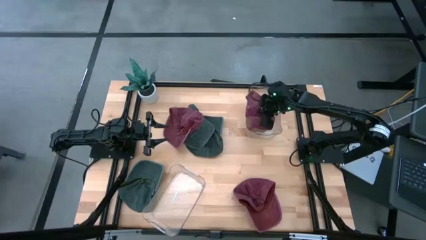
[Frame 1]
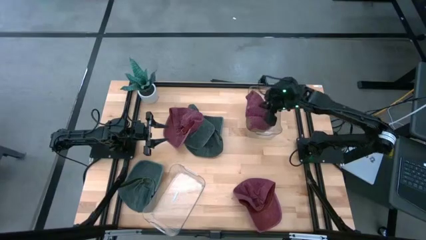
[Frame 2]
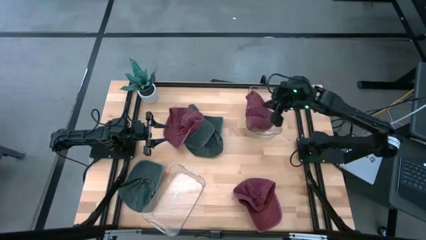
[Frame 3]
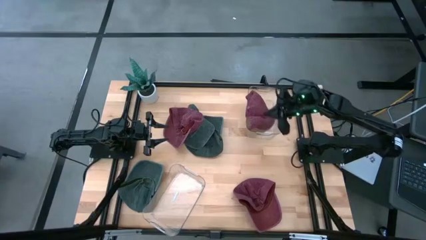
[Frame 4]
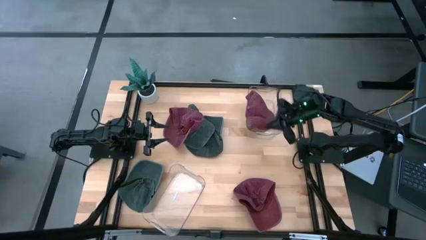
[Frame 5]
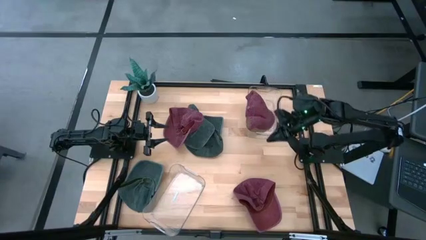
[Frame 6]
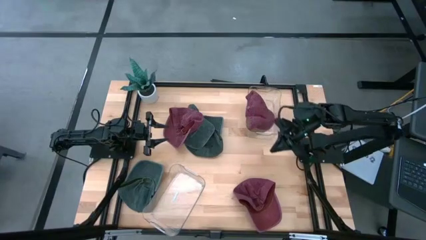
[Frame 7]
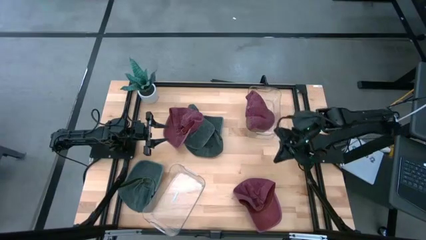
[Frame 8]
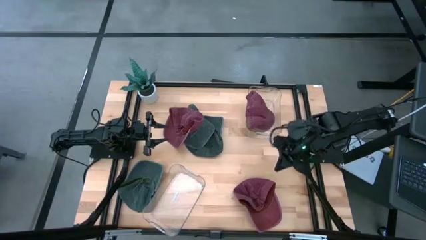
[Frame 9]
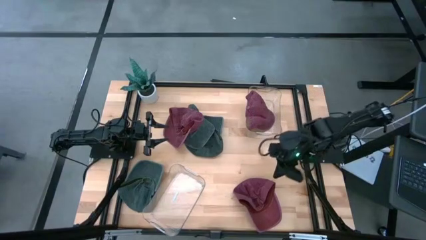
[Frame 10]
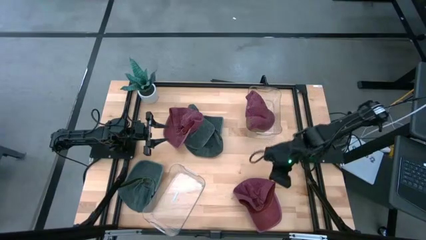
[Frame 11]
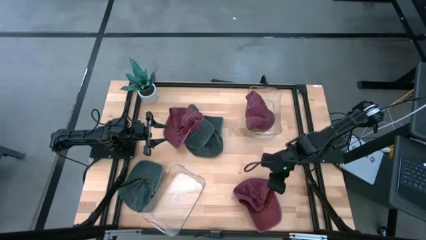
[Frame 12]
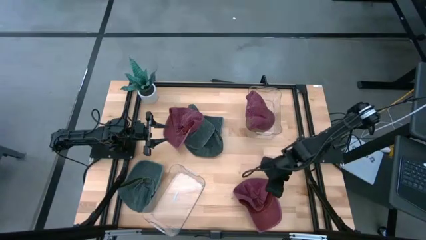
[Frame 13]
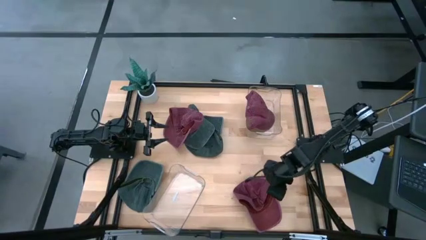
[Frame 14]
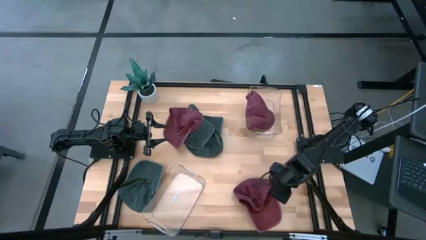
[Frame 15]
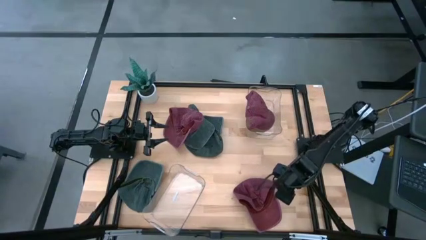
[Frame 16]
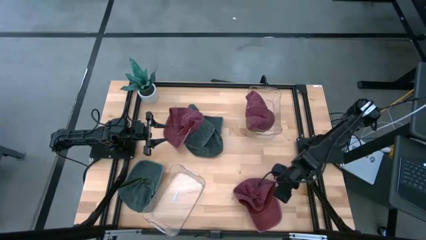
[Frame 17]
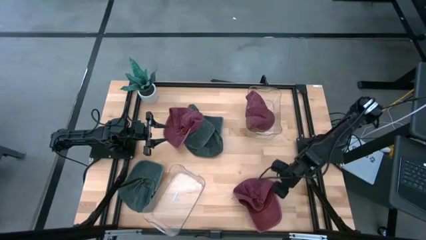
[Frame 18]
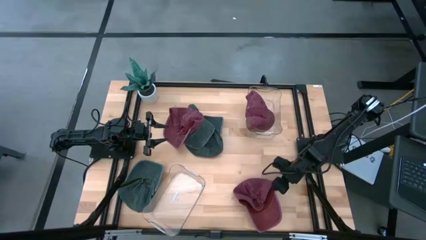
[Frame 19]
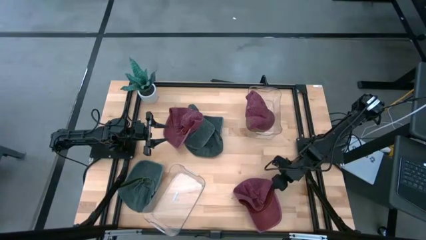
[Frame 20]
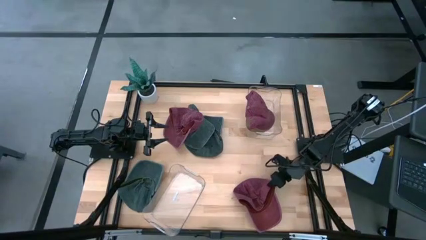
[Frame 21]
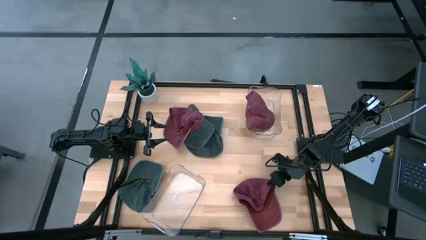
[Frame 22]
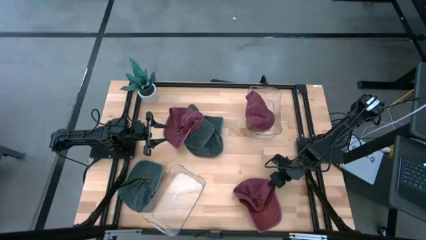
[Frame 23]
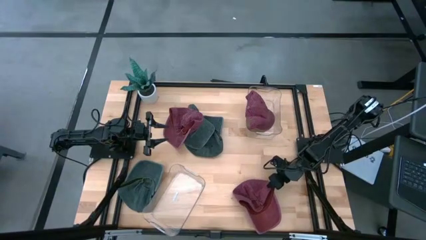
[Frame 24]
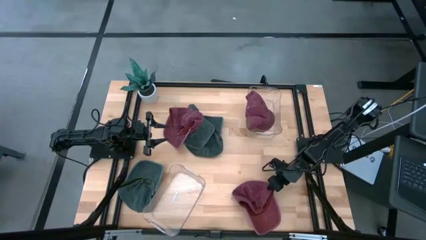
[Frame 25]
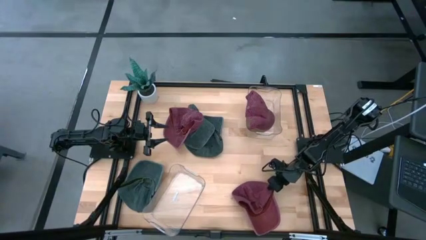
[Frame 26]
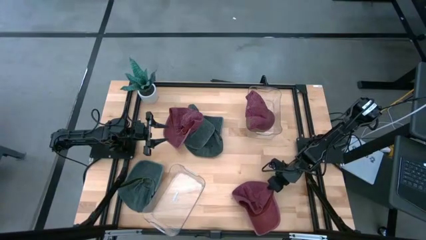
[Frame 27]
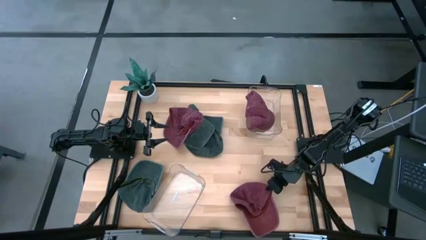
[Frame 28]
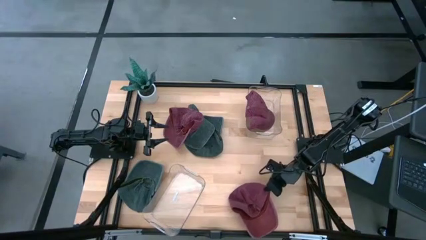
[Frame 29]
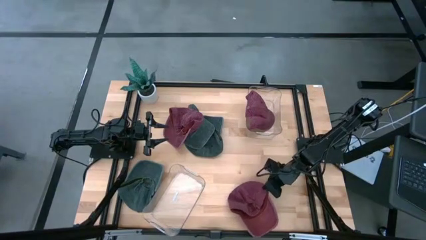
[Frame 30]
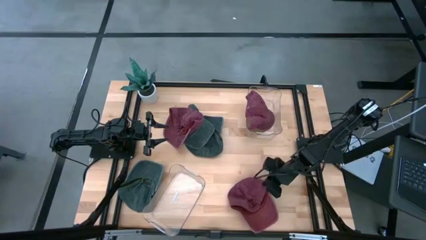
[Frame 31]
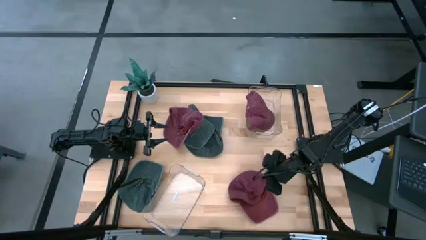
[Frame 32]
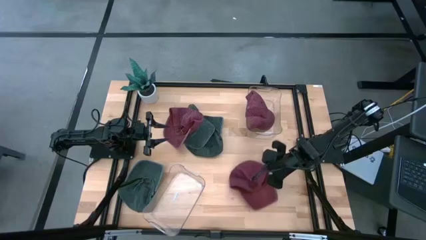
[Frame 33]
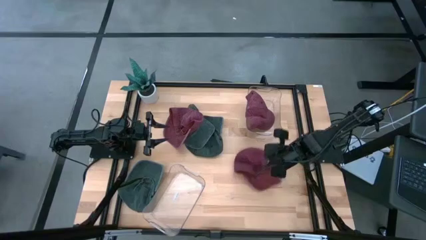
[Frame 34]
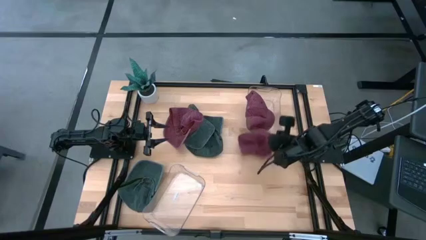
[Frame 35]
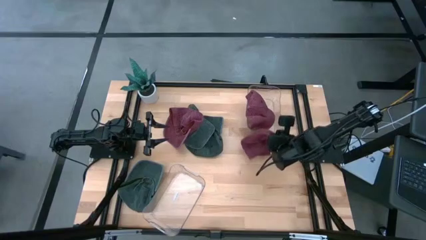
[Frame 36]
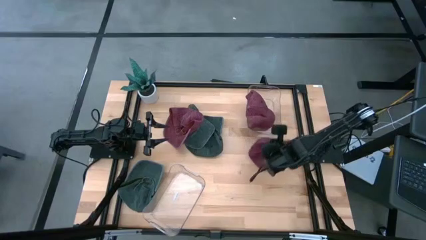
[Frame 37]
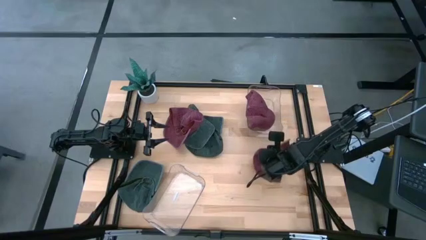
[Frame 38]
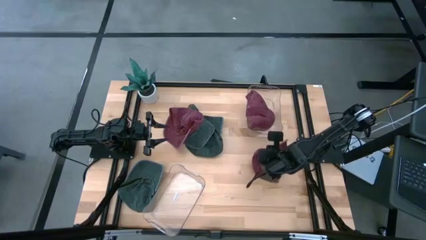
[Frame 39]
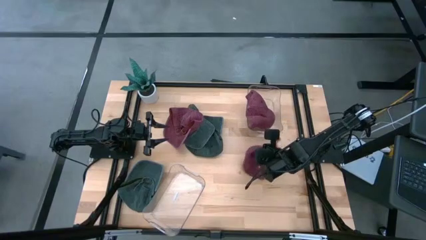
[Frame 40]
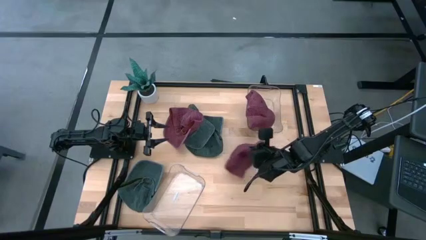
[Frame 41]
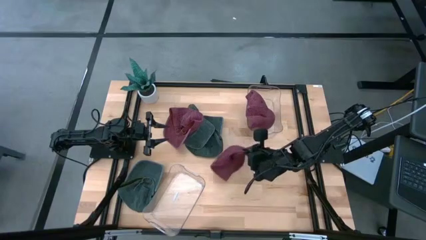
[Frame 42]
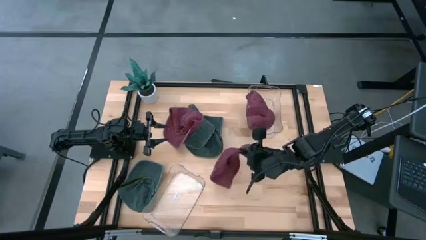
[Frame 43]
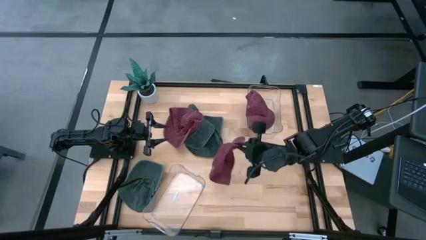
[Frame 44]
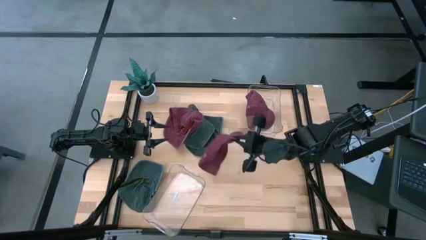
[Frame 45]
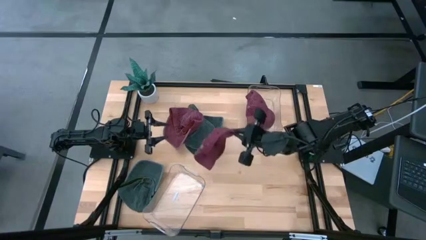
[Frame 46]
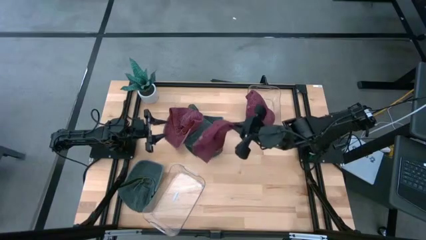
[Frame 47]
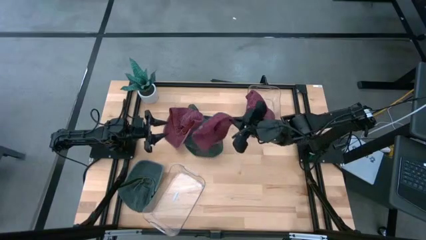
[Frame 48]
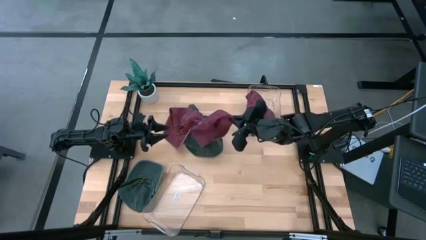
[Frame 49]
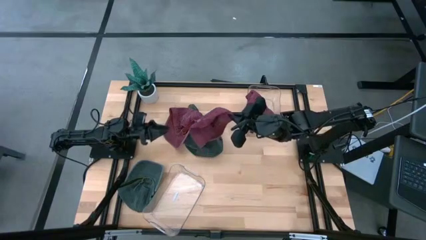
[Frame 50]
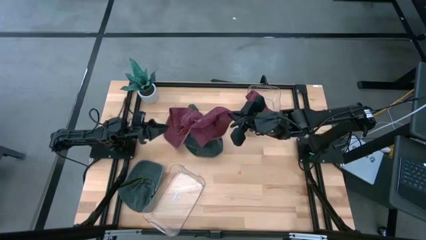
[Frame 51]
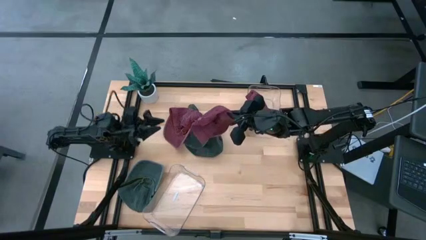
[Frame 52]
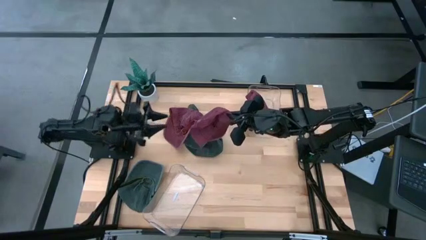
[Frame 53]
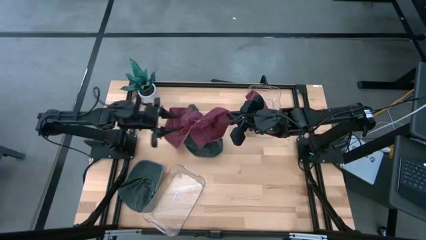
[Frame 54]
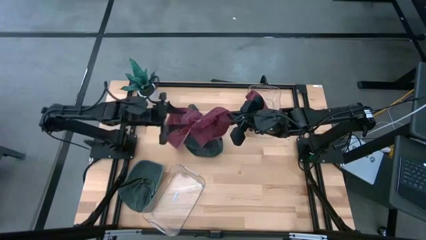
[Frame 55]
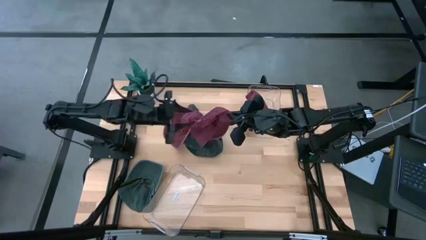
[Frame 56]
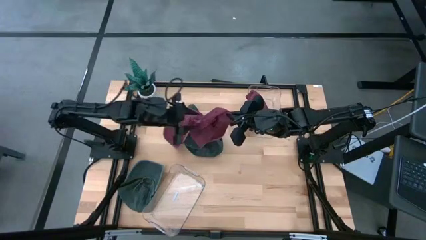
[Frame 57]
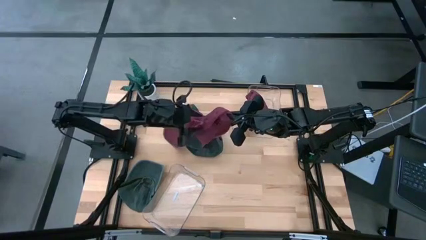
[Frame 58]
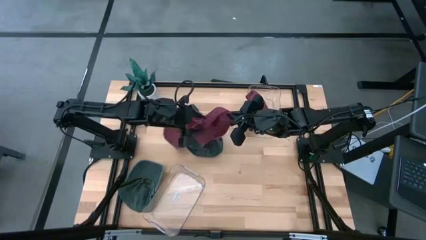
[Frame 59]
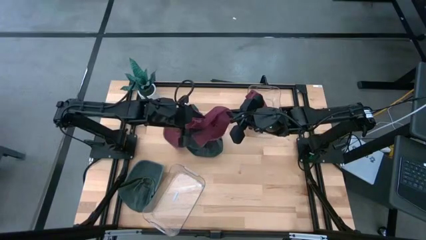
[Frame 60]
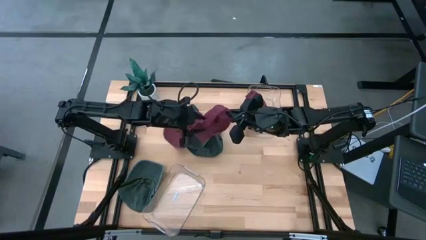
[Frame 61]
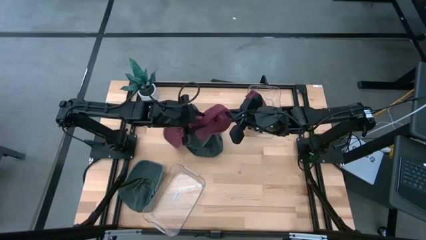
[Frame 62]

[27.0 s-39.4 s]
Task: Pick & Place hat
Put the bottom red cap into the top transparent bin

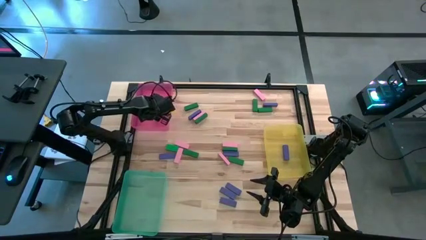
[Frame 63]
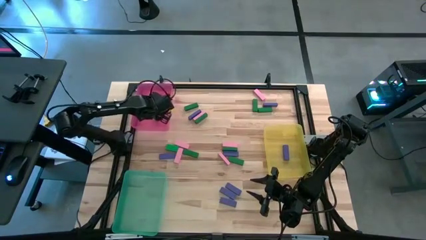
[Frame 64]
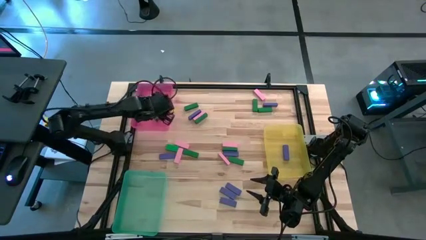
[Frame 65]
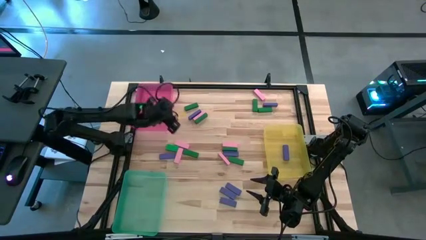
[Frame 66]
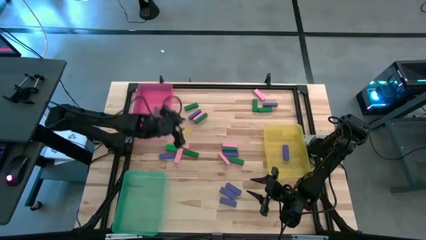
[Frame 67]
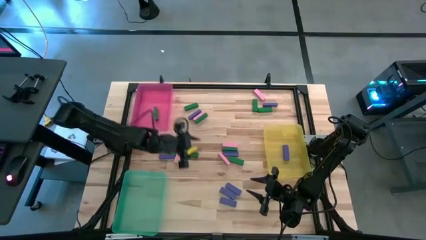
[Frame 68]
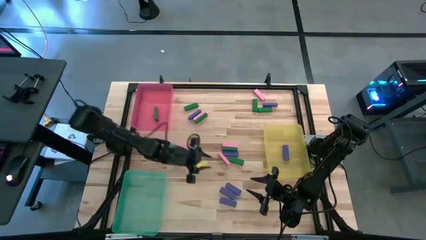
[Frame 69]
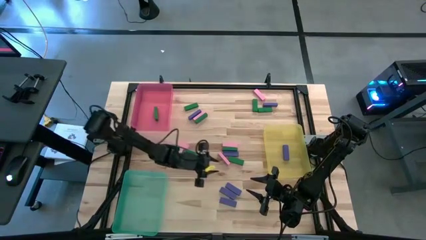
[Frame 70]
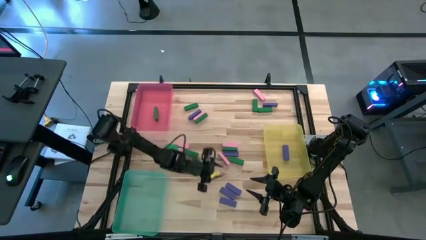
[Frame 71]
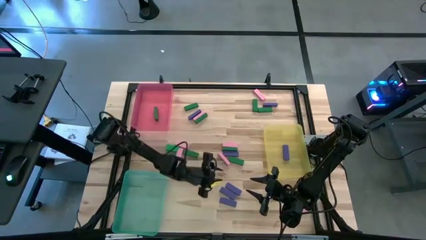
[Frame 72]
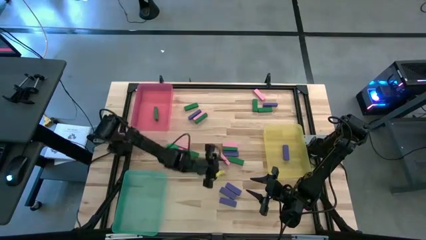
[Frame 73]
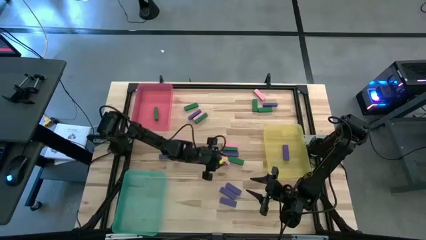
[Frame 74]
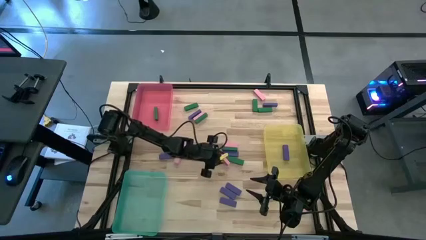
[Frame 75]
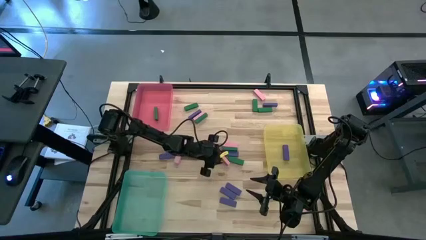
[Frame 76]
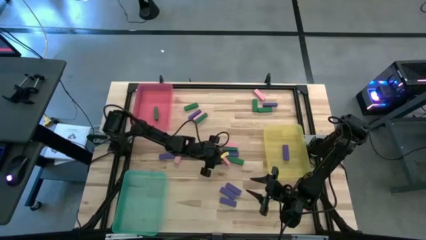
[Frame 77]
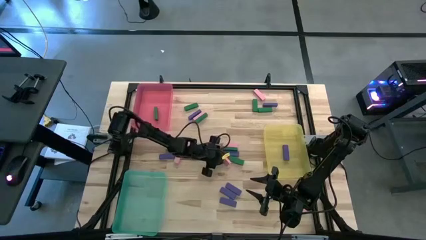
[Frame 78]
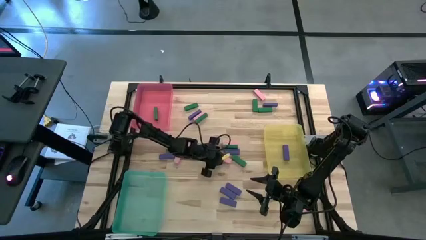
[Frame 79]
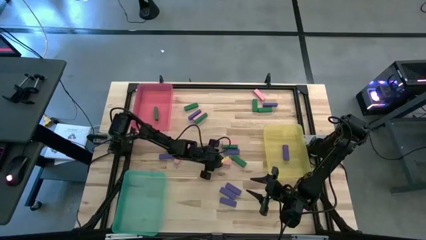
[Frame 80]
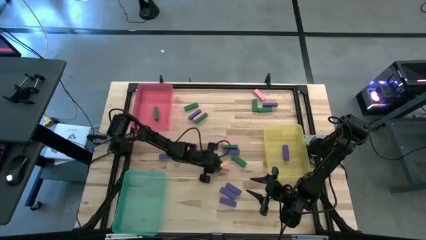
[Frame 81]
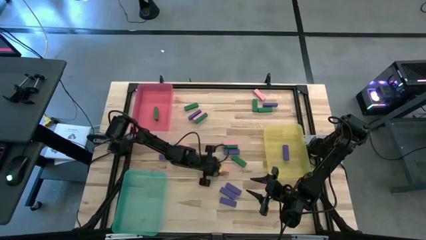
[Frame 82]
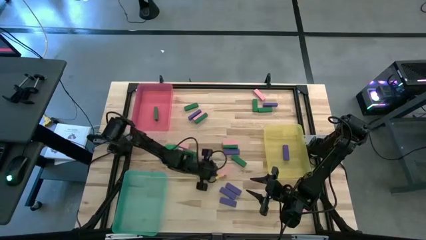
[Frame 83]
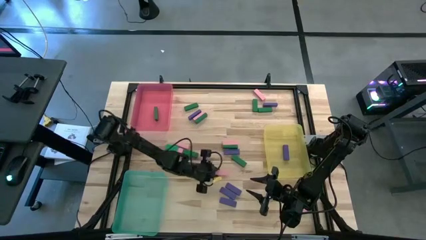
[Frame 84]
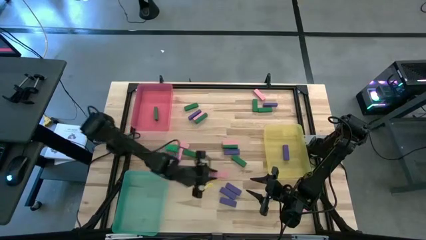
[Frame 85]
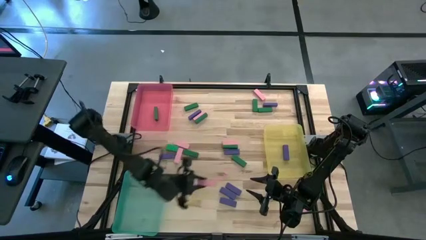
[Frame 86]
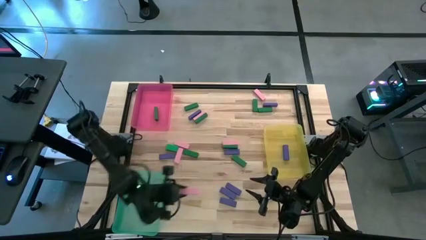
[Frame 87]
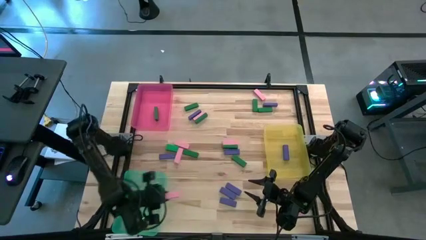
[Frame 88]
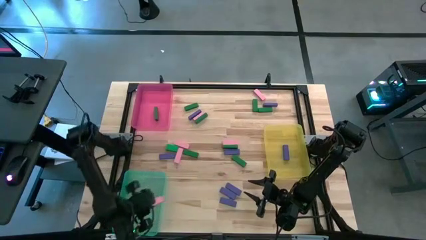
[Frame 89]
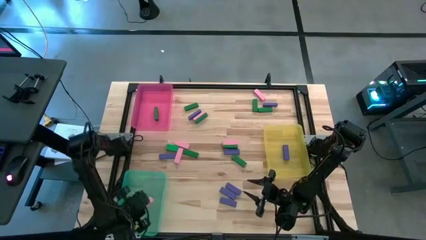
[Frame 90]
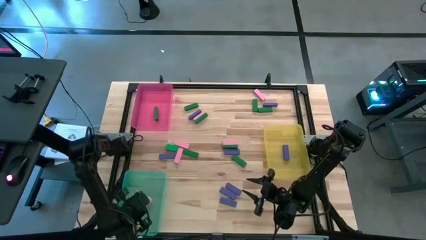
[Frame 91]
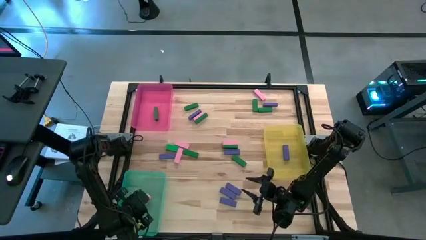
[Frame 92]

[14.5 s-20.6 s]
Task: Sort blocks
Put the pink block into the green bin
